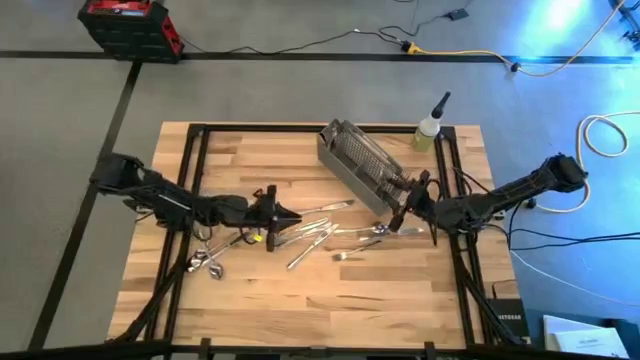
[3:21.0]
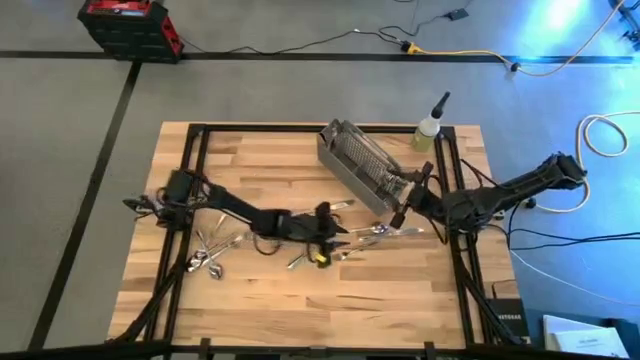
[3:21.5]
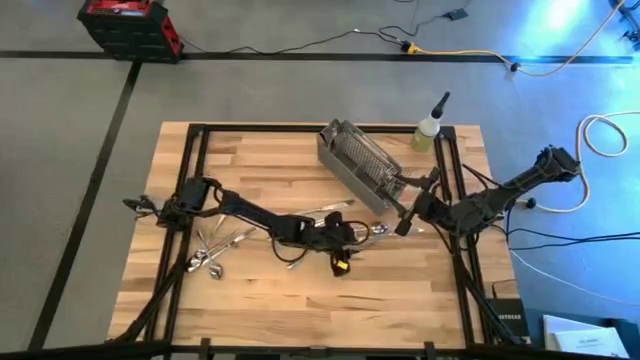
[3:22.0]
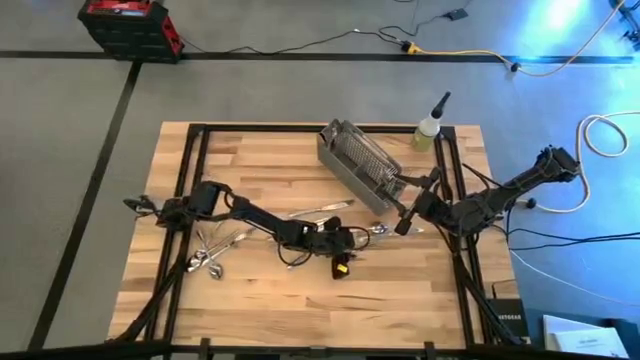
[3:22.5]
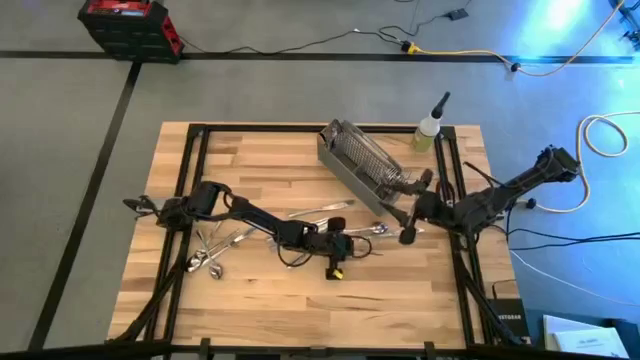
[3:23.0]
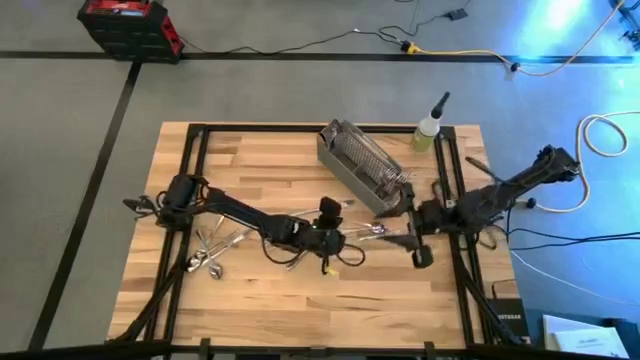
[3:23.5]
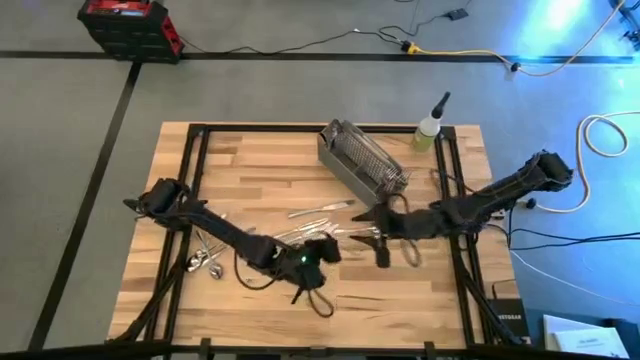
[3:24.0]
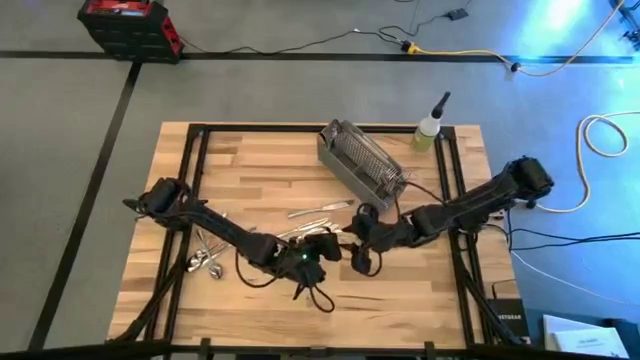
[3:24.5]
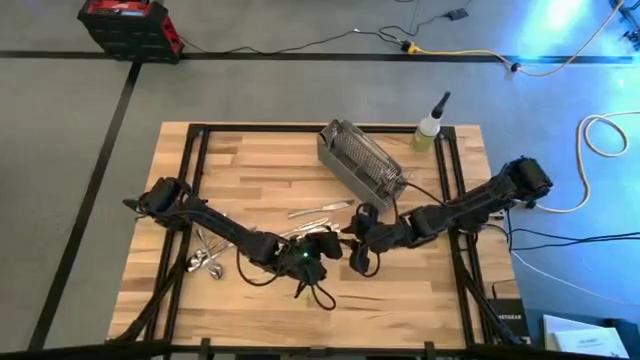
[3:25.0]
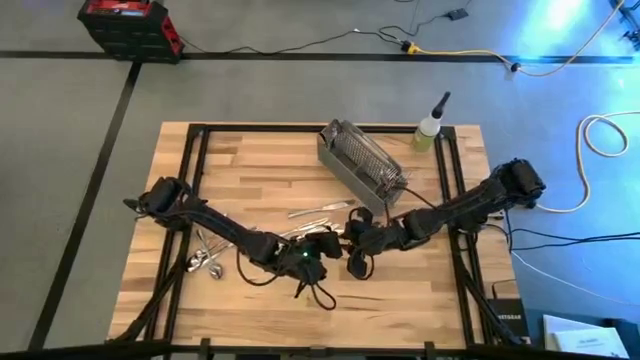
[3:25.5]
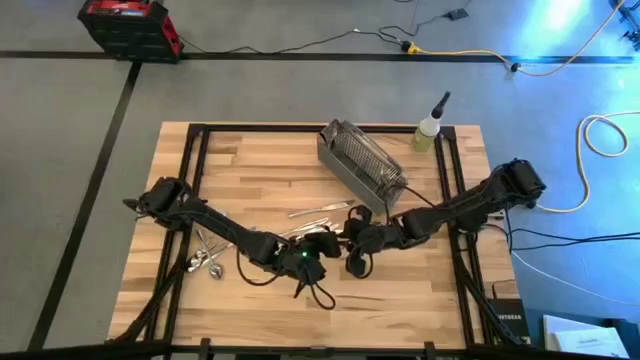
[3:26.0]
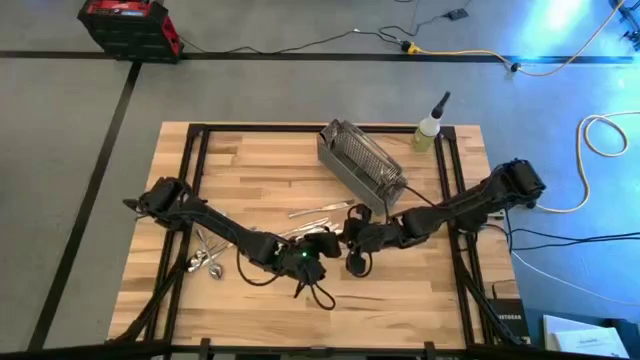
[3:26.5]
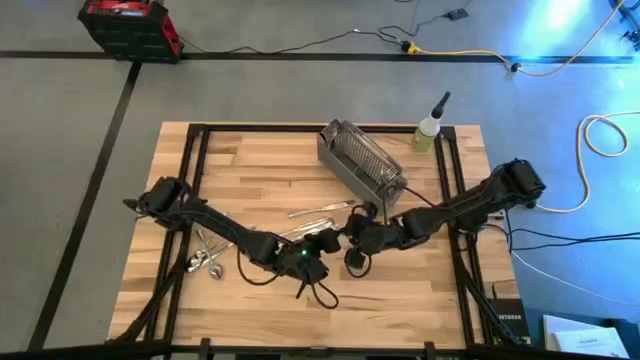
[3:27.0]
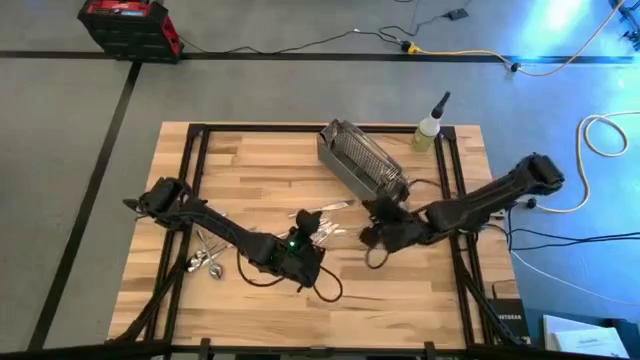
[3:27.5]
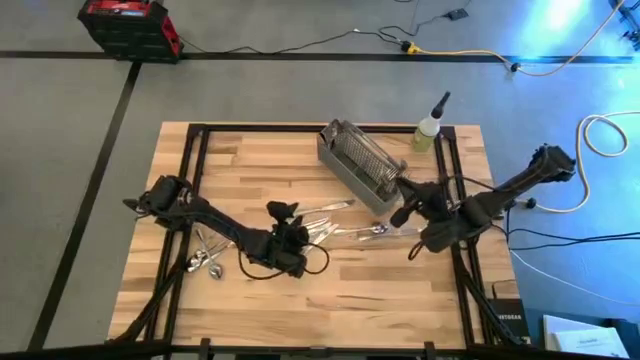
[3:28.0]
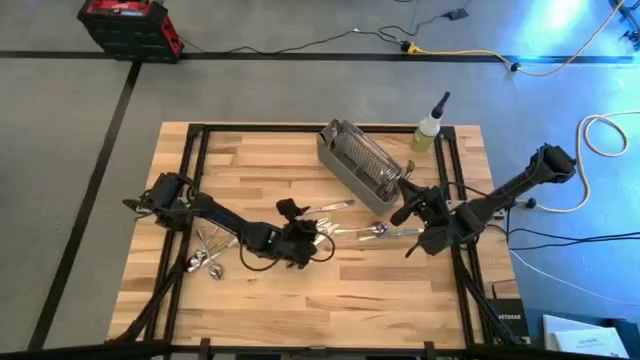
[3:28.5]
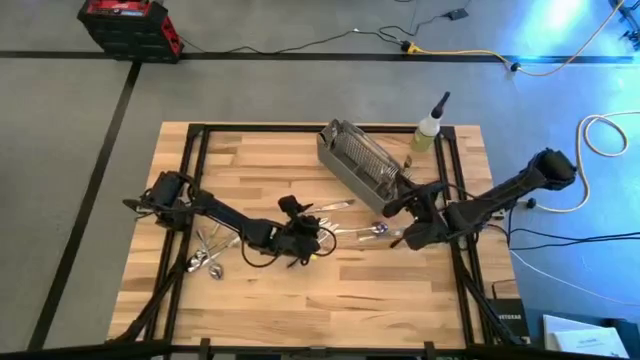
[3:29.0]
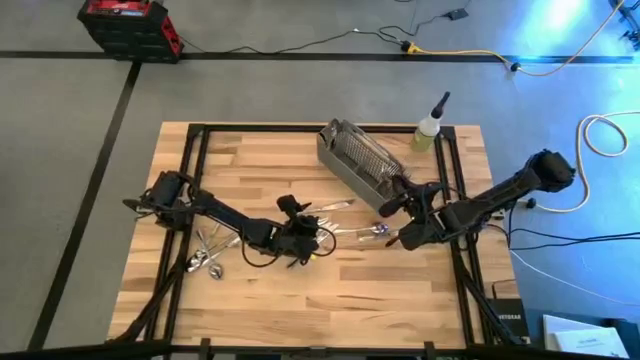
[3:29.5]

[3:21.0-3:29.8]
Task: Sort silverware
Put the silver fork into the gray silverware organizer

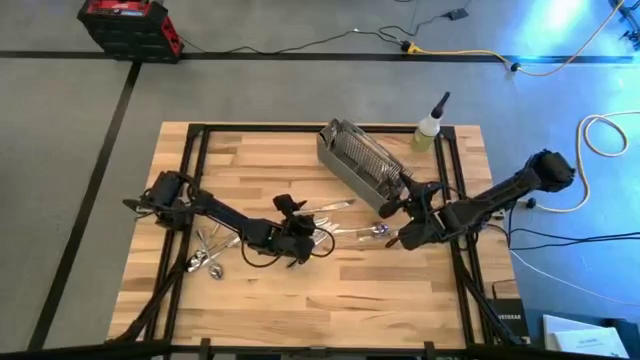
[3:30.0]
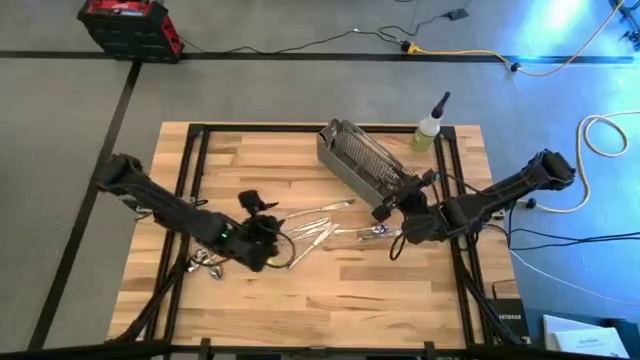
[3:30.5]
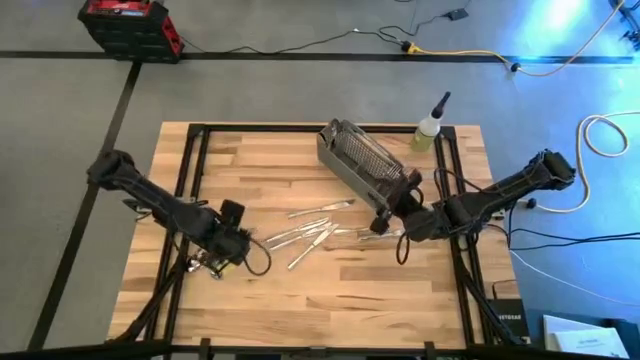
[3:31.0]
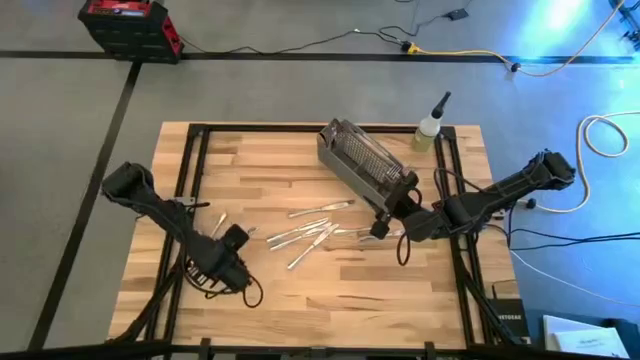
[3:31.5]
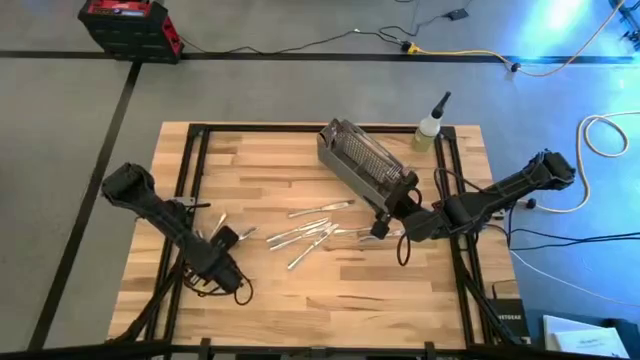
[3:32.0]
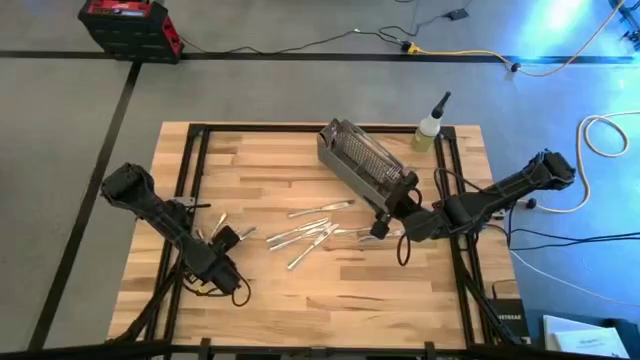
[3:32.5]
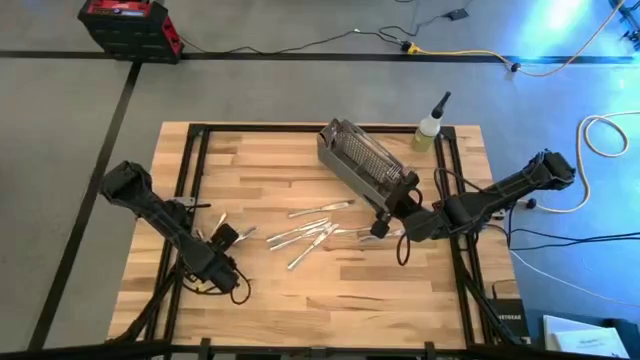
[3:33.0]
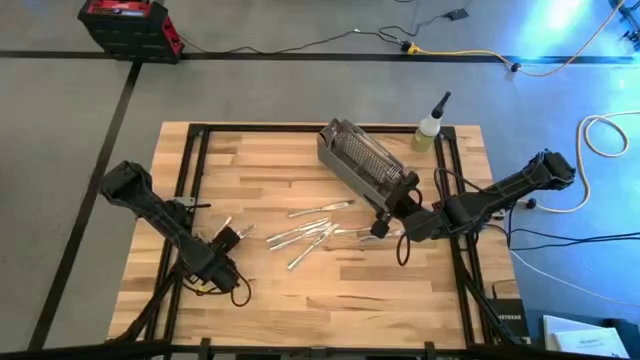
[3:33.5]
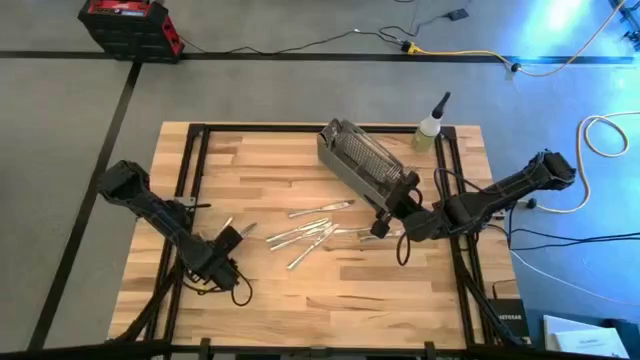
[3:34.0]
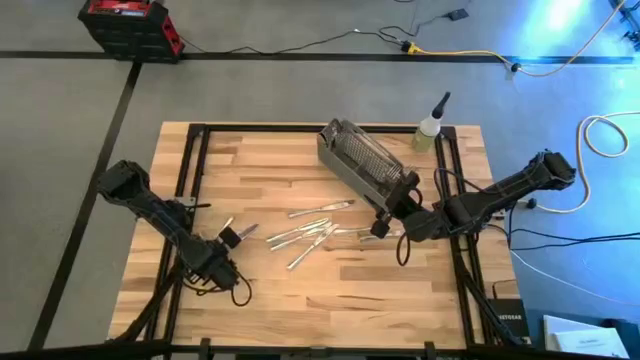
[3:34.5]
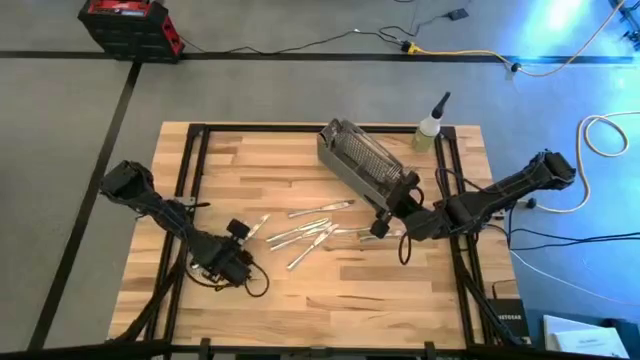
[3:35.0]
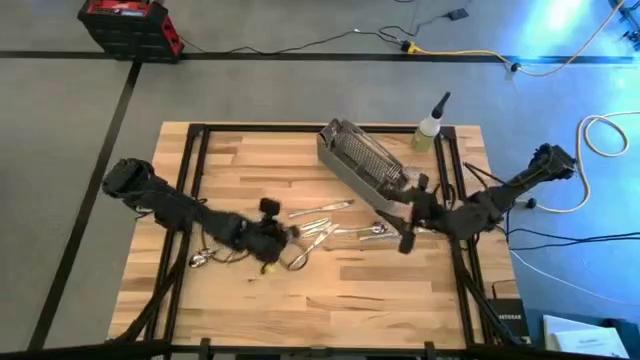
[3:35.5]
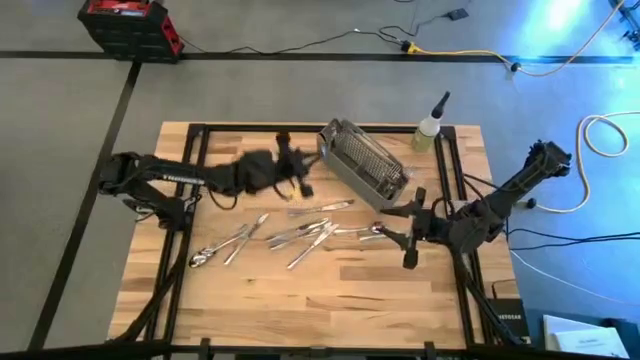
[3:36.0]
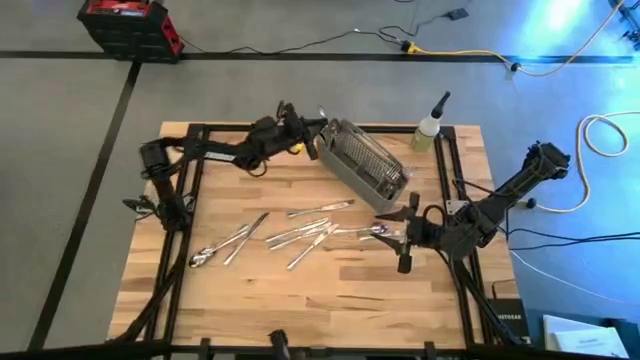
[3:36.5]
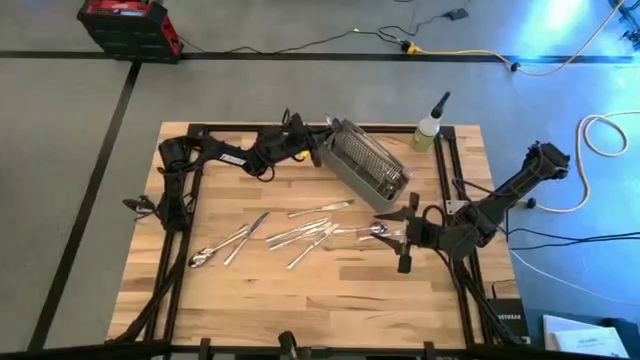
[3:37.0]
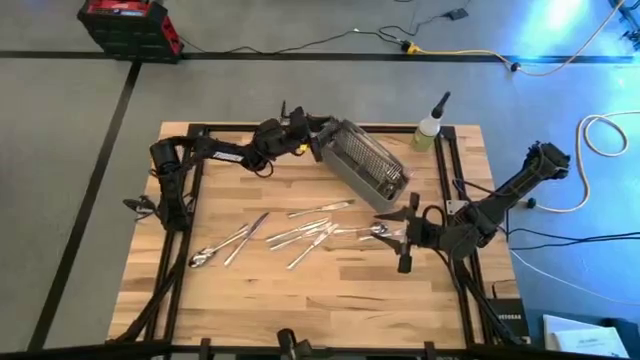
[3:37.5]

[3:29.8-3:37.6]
Put the silver spoon into the gray silverware organizer

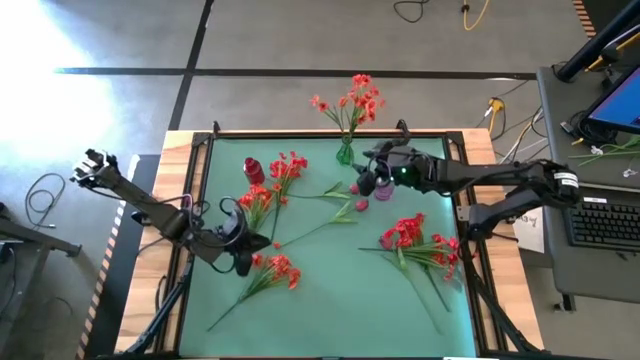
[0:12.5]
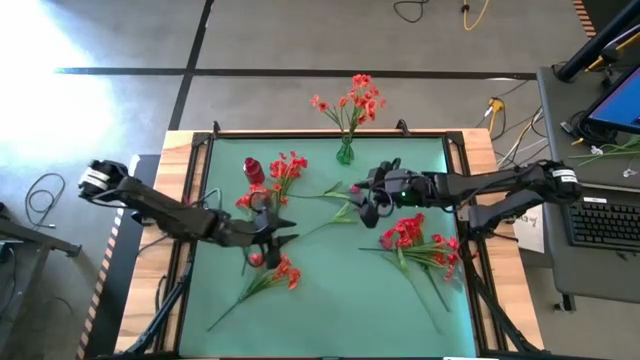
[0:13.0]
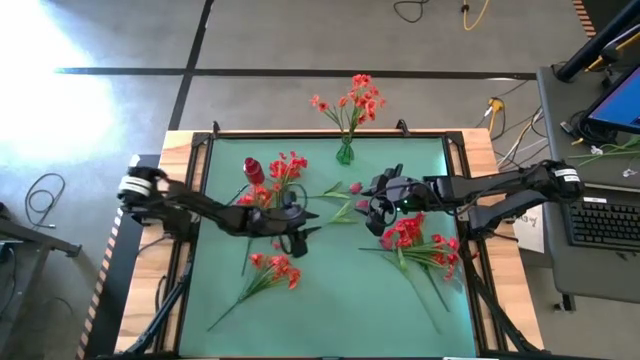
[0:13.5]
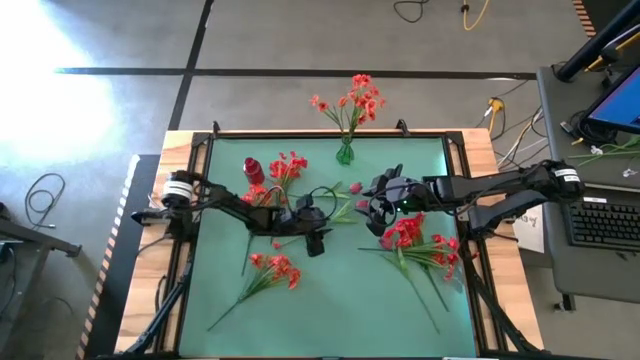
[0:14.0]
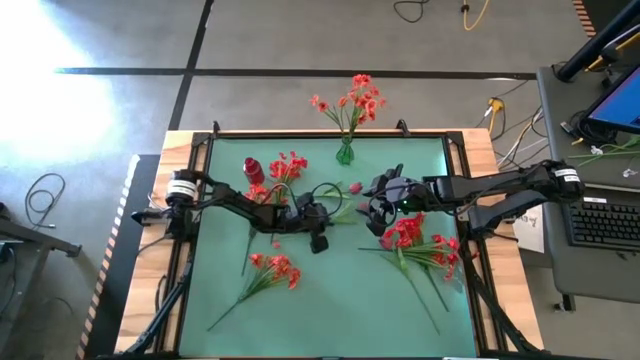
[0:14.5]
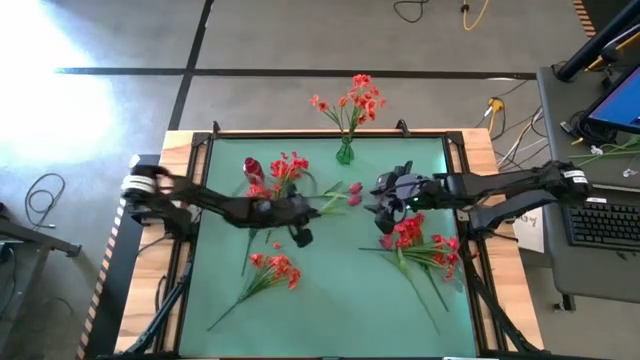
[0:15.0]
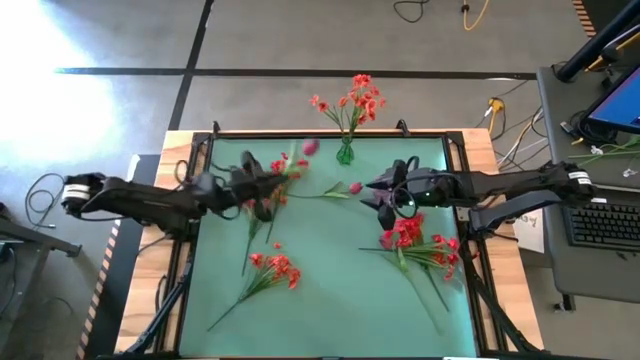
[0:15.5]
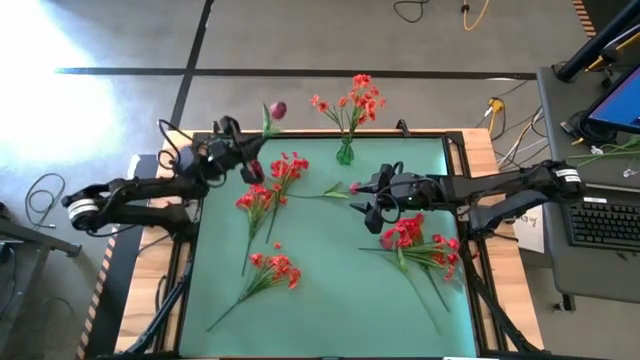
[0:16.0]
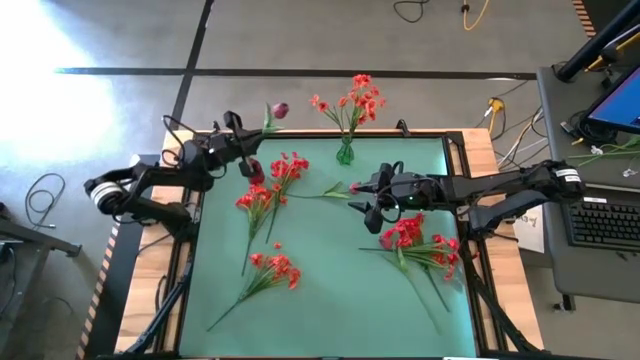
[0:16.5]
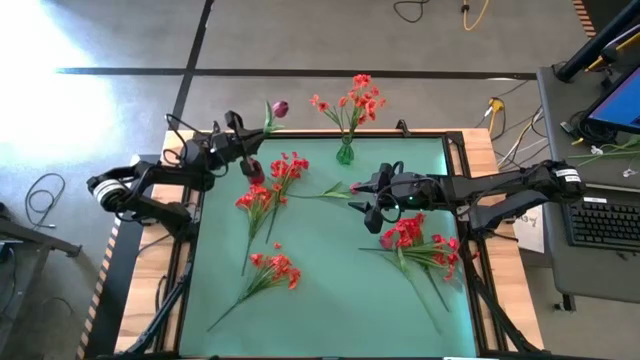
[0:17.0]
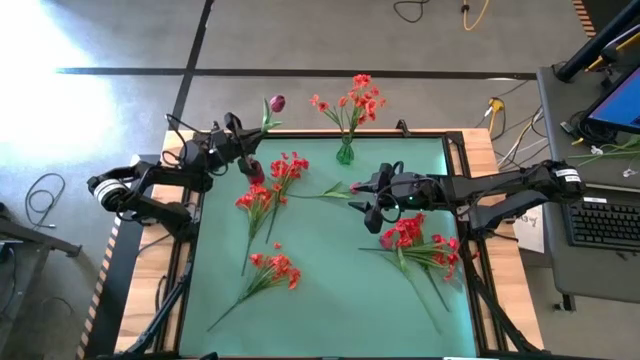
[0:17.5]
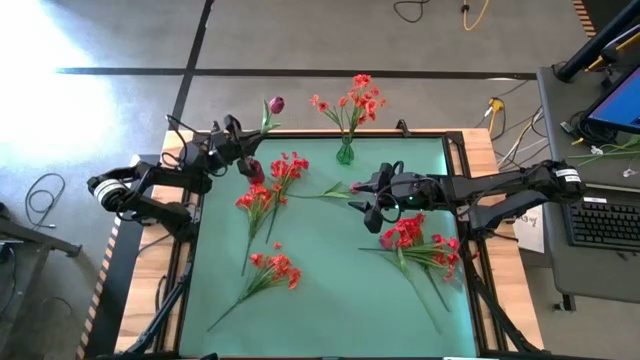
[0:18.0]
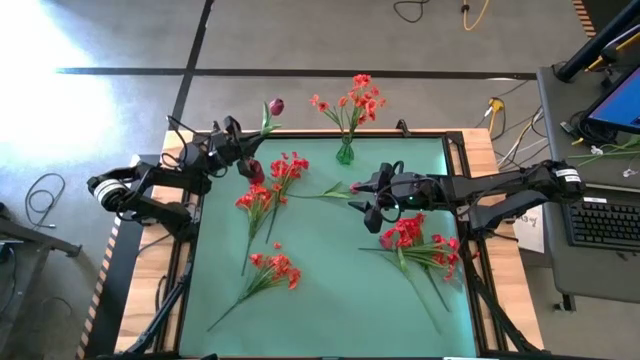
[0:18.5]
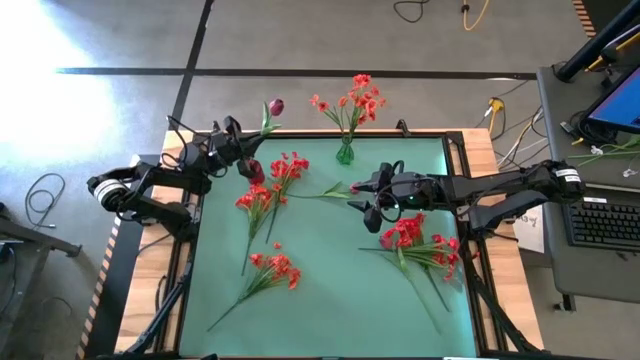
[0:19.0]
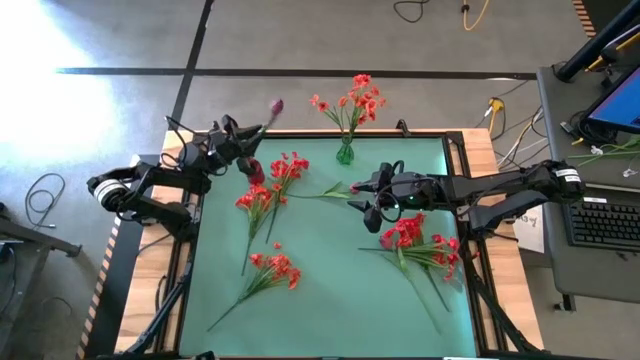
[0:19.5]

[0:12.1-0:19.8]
Task: Sort flowers into vase by color
Put the bottom left dark red flower into the red flower vase
